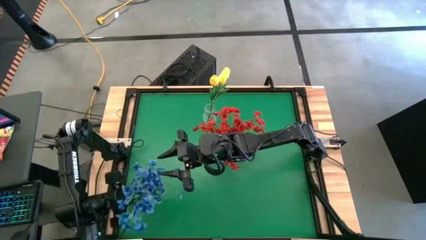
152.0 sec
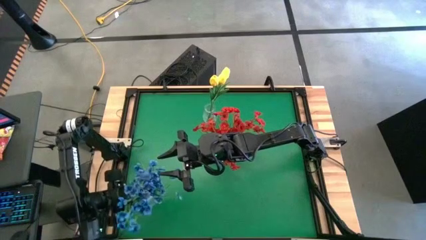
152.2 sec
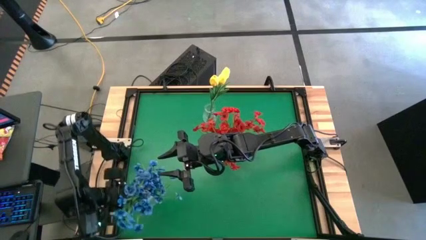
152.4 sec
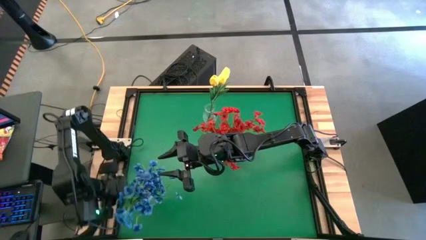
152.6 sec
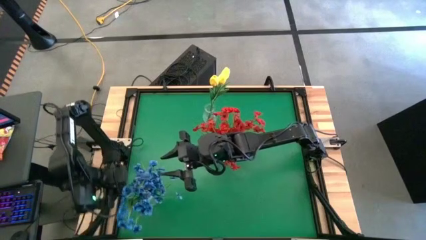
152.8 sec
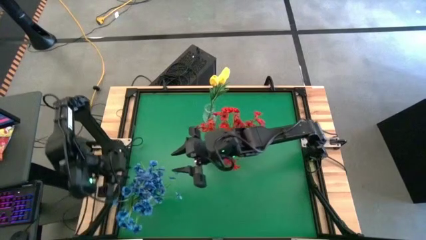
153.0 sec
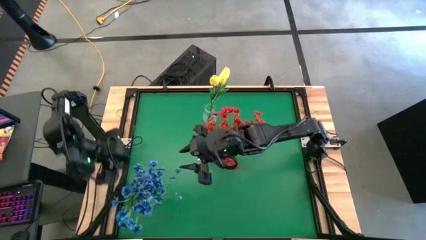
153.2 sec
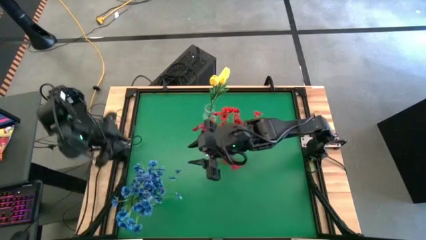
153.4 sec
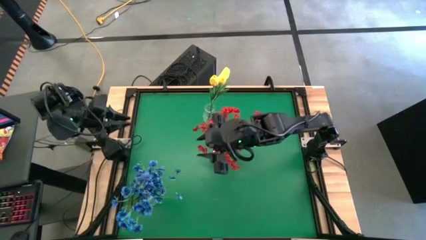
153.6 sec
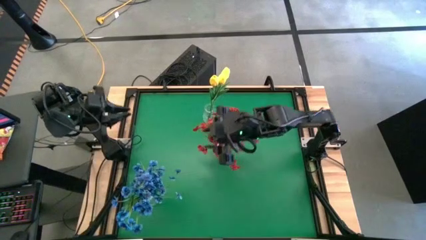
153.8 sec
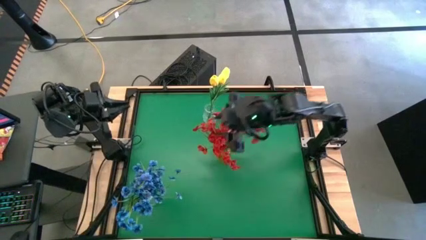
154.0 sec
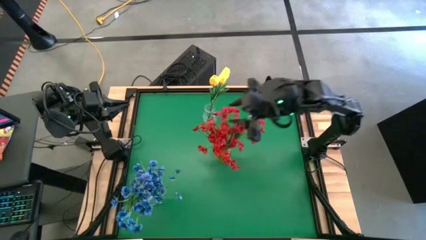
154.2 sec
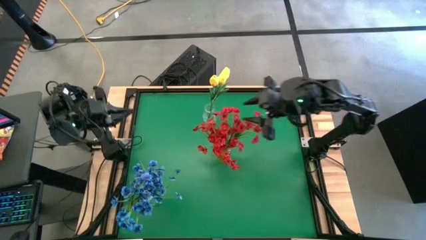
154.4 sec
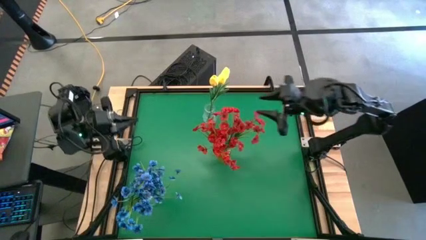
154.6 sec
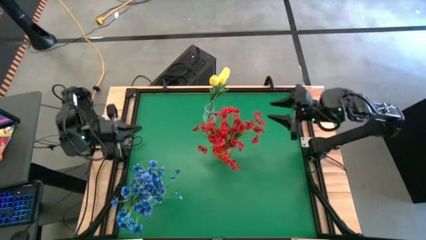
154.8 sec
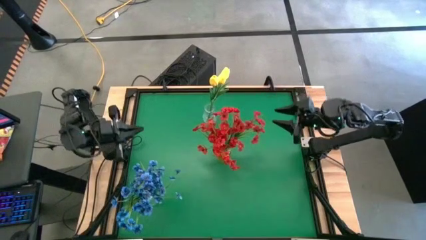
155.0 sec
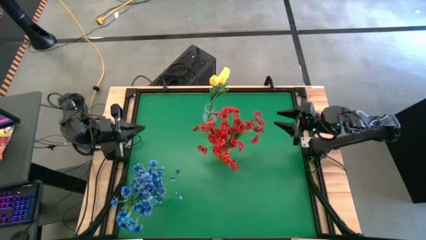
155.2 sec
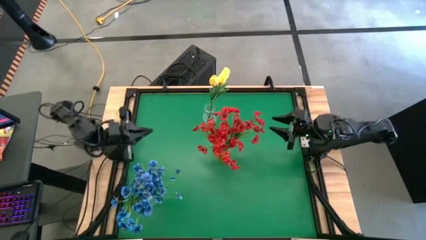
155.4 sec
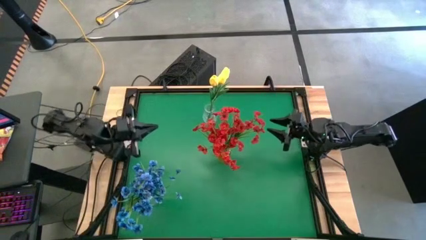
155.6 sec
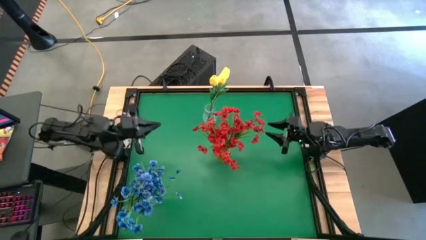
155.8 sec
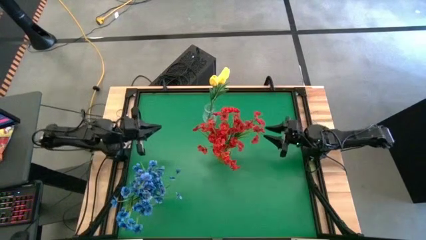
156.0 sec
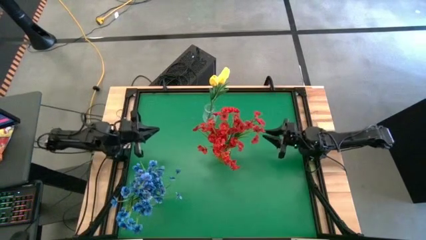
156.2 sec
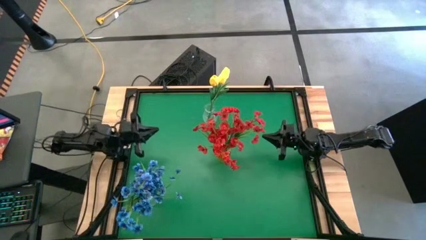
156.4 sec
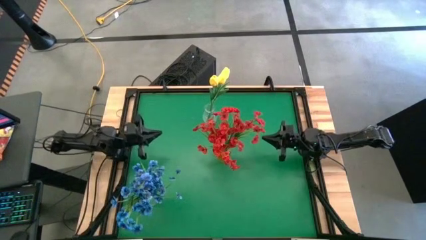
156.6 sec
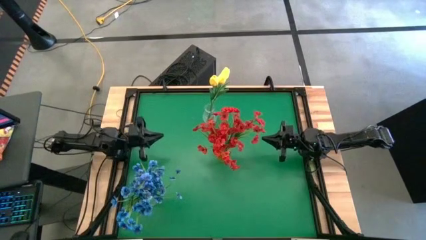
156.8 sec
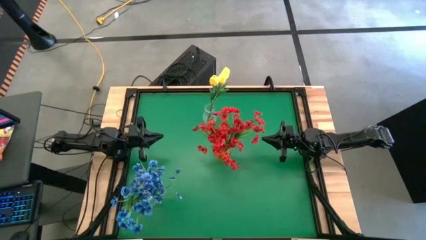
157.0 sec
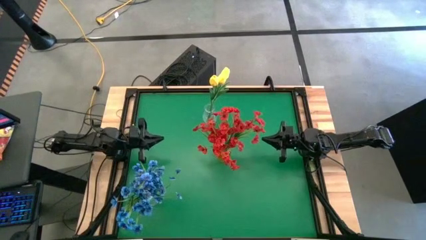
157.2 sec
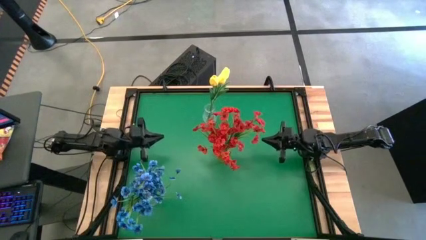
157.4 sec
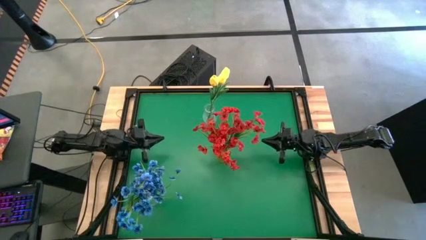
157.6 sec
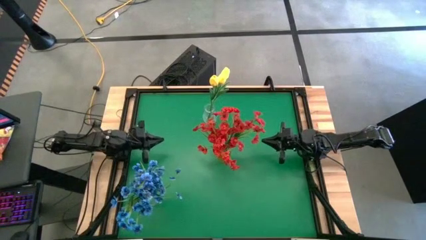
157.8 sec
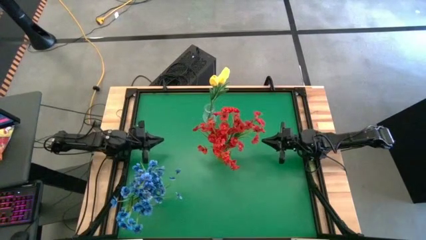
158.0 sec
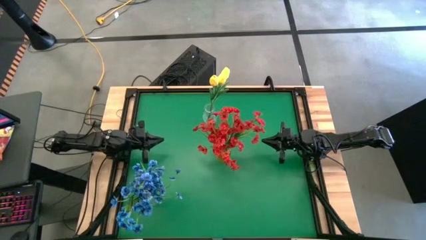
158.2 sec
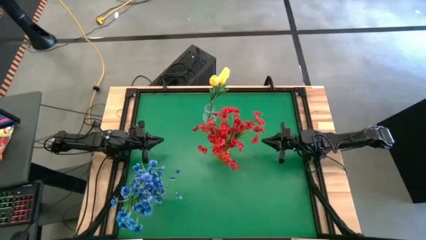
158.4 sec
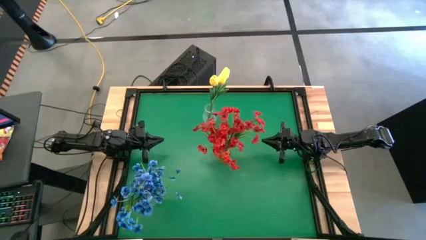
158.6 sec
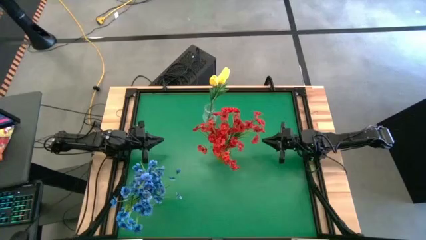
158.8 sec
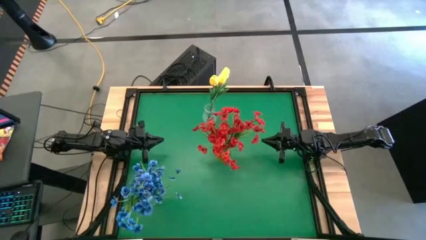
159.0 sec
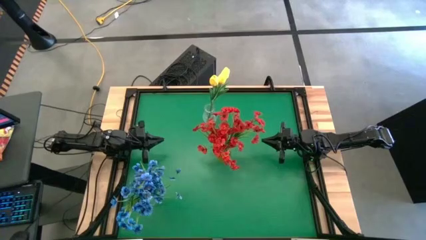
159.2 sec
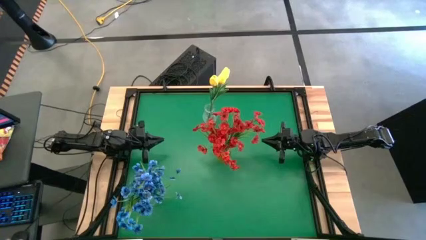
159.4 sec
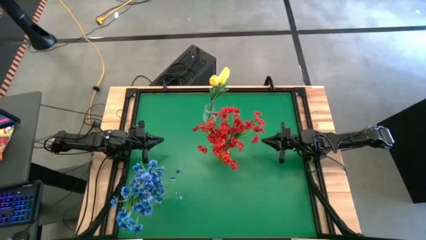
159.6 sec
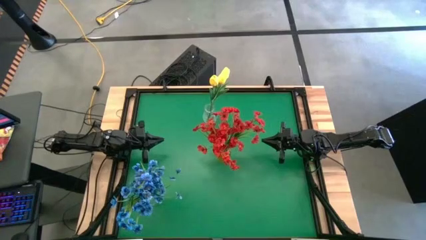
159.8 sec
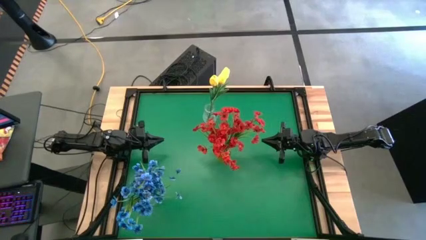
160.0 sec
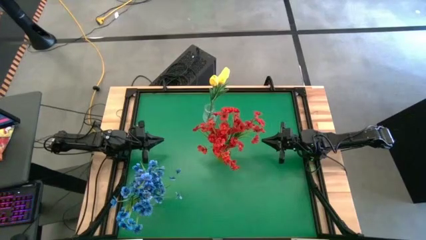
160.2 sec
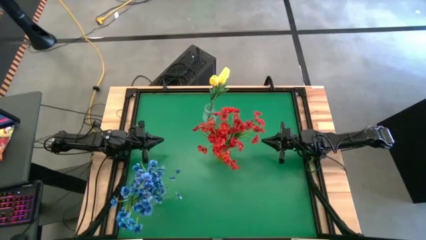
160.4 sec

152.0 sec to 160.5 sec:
Task: Sort flowers into vase by color
Return to Home Position

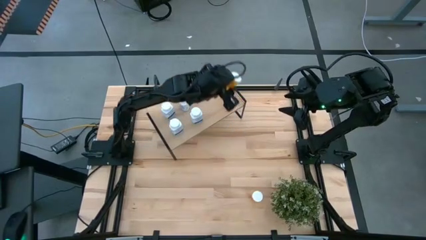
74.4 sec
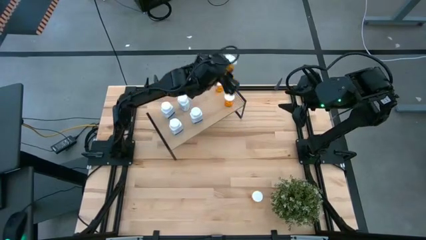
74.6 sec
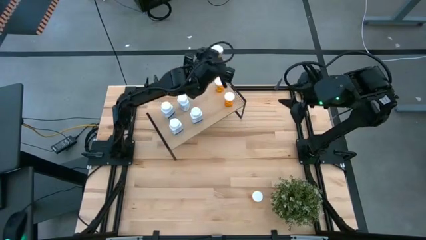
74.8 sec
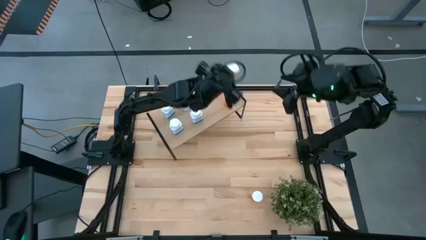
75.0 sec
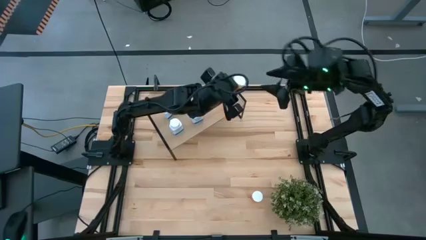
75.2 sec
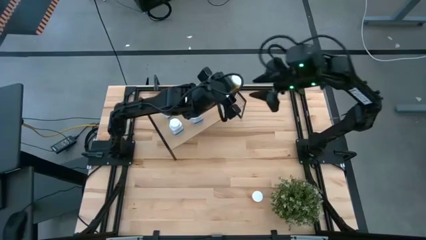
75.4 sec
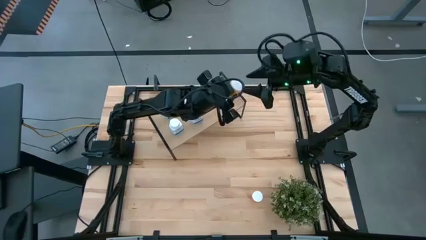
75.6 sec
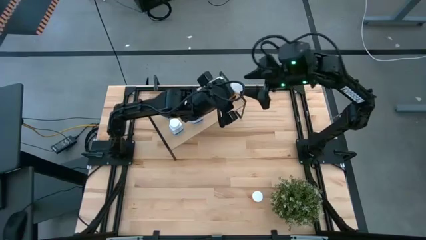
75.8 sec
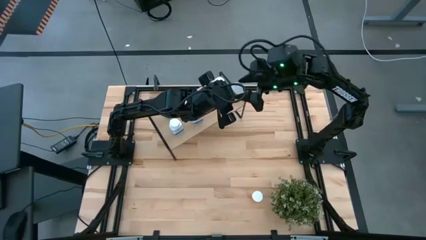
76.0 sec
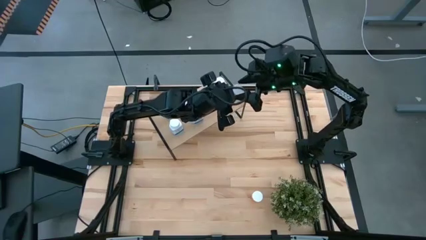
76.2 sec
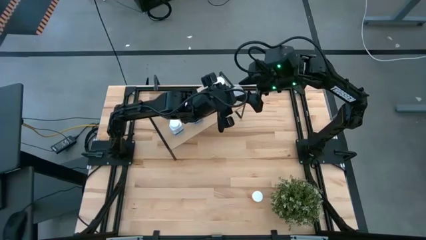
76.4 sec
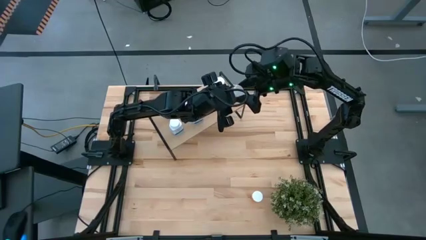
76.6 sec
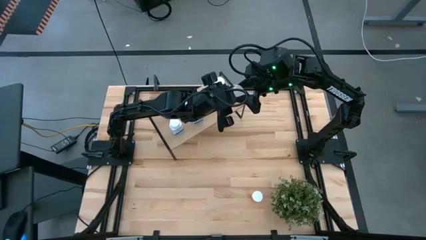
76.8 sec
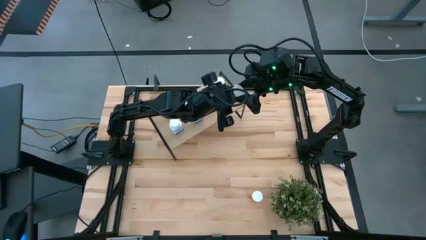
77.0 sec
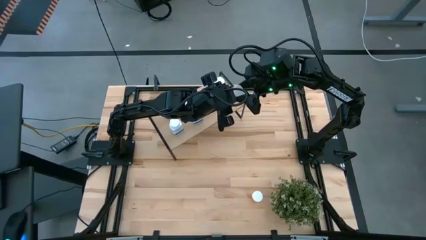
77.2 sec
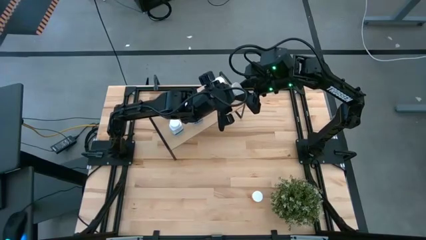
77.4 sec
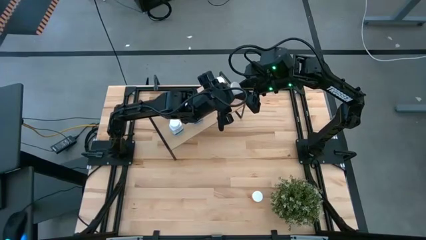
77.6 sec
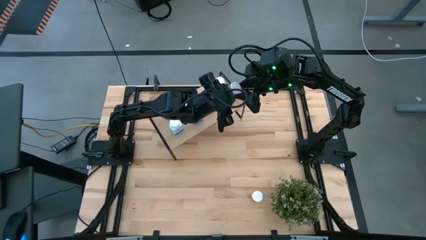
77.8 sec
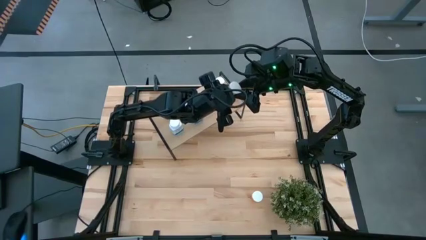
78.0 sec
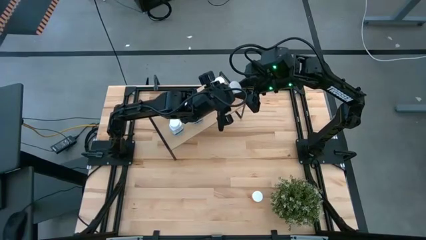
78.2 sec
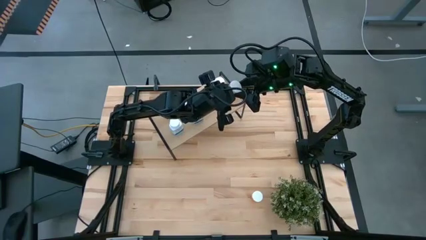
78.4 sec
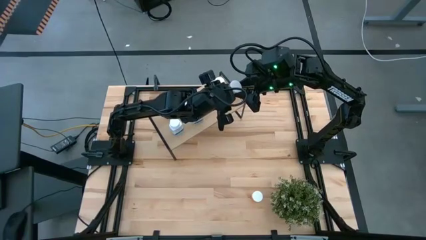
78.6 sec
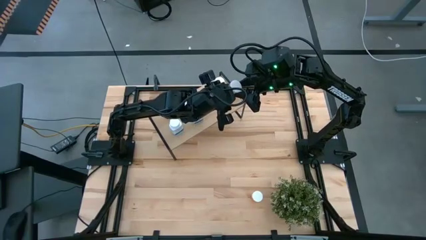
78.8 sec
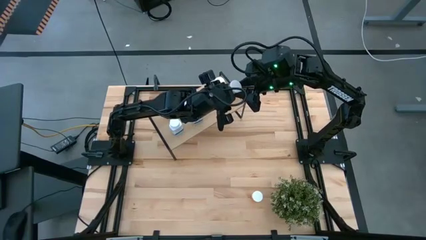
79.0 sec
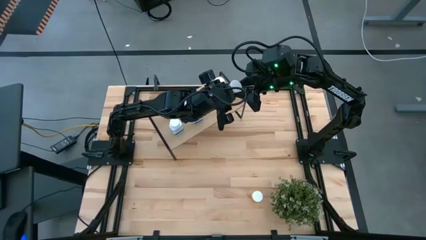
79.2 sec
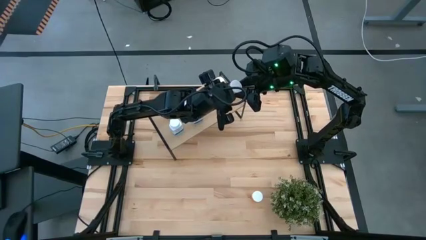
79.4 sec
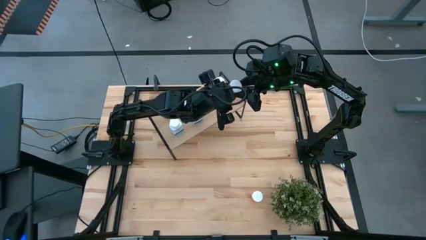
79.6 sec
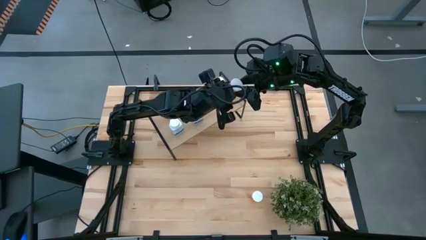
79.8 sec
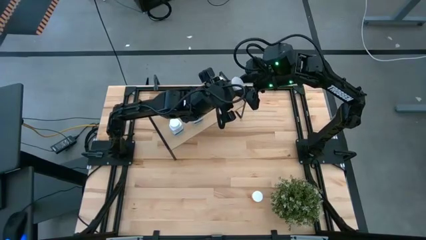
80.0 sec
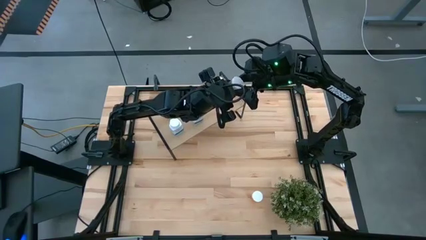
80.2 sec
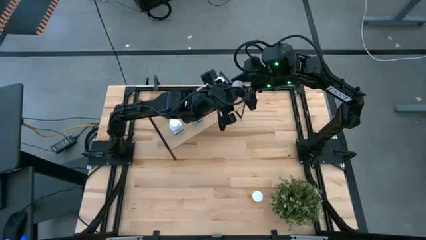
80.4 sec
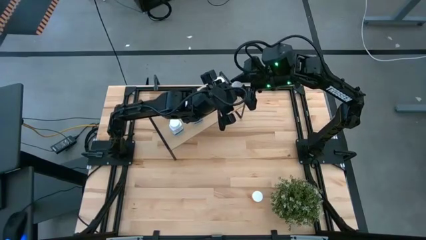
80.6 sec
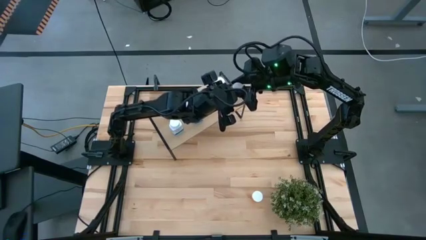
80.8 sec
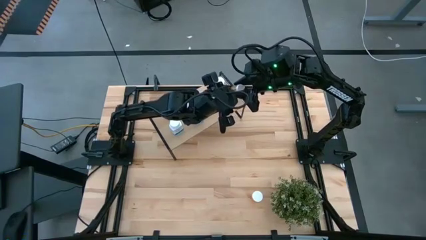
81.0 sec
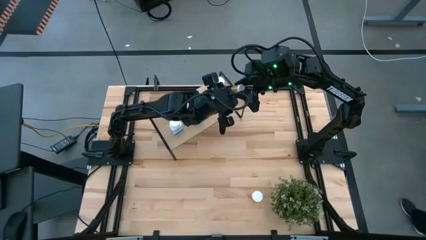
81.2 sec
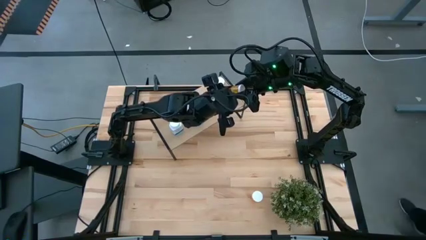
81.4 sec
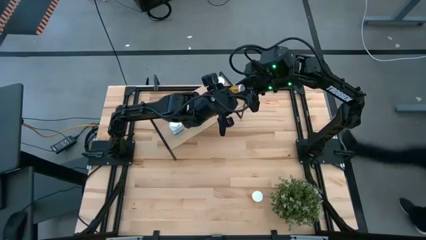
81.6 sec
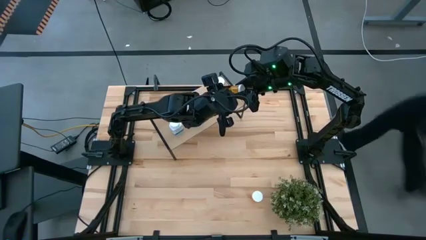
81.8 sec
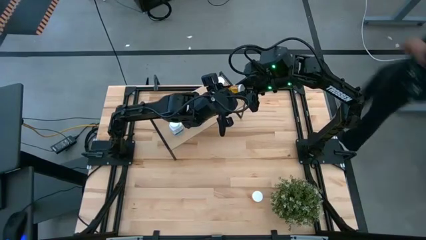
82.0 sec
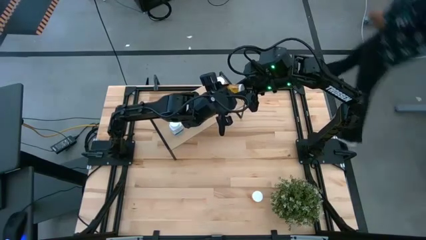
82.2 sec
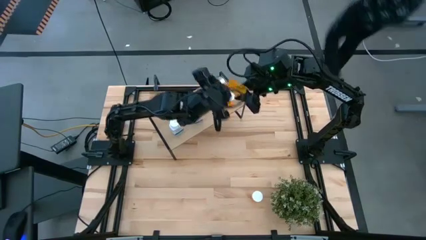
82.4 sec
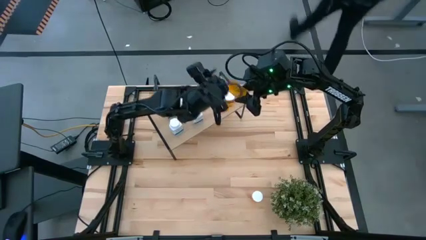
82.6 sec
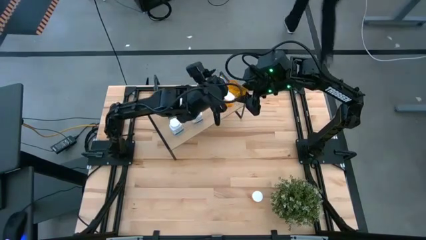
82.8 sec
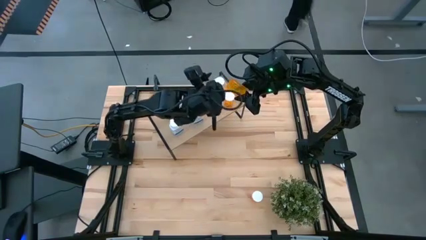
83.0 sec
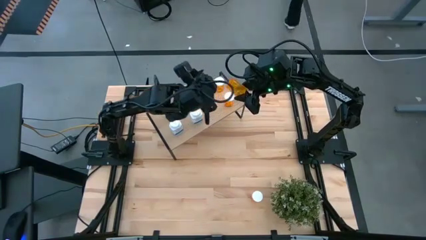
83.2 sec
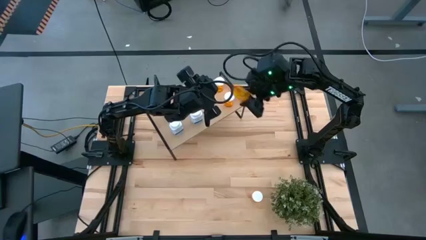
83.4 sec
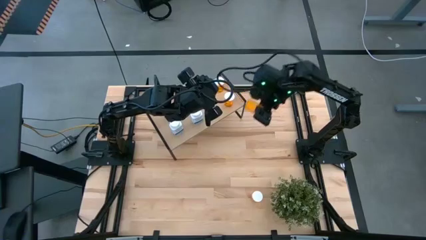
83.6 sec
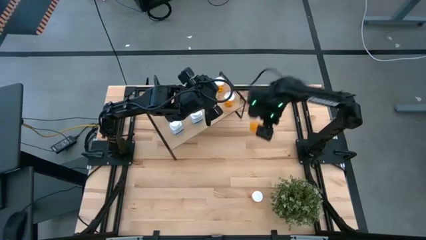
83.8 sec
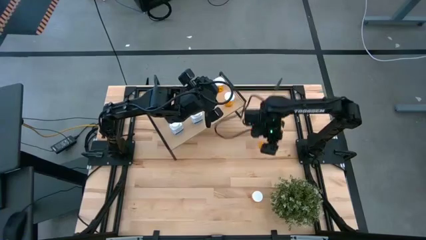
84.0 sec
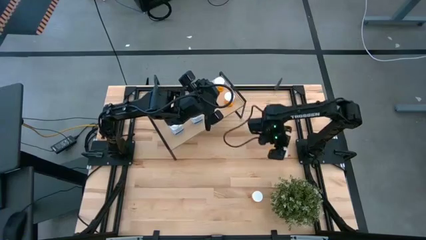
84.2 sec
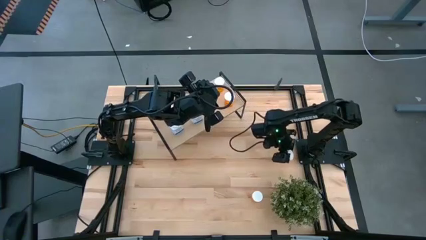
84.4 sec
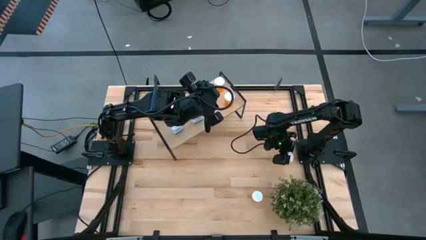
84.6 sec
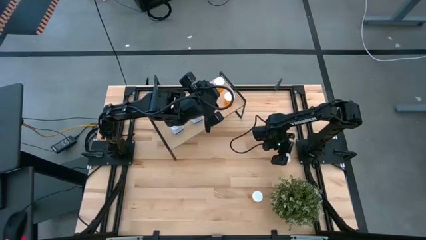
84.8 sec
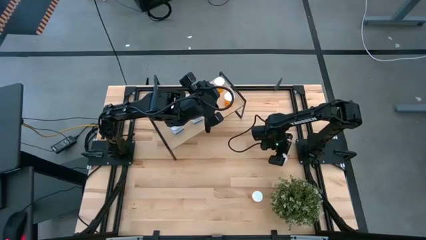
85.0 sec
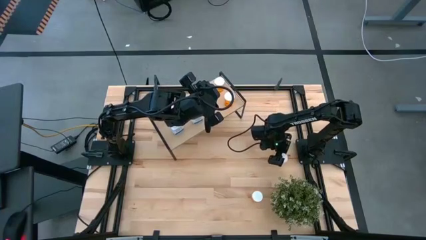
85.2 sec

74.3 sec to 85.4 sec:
Task: Pick and place medicine bottles onto shelf by color
Put the orange pill bottle on the shelf
